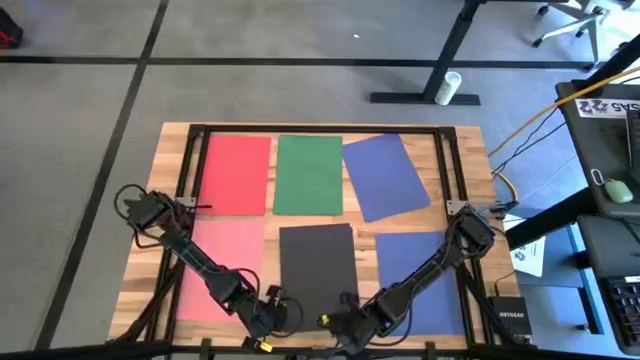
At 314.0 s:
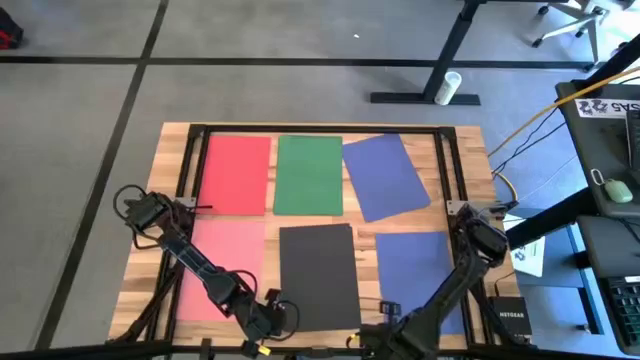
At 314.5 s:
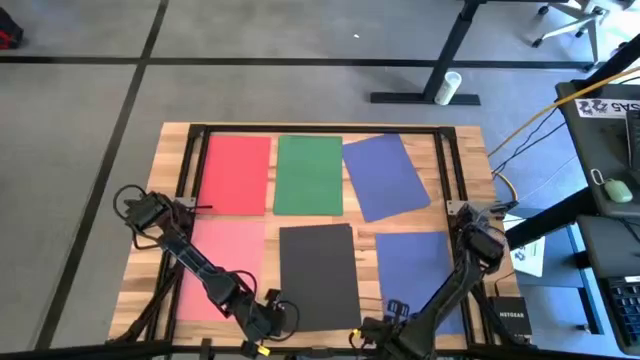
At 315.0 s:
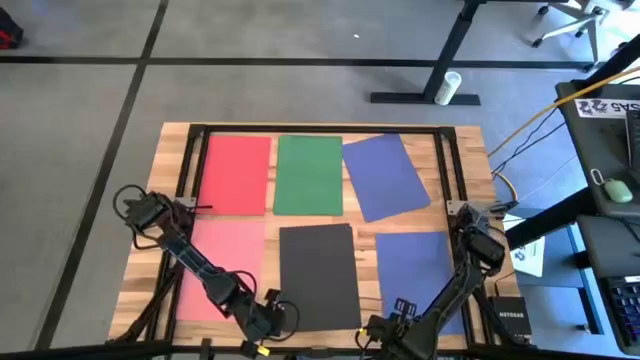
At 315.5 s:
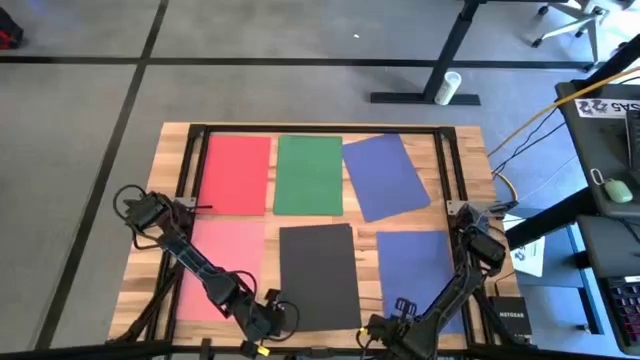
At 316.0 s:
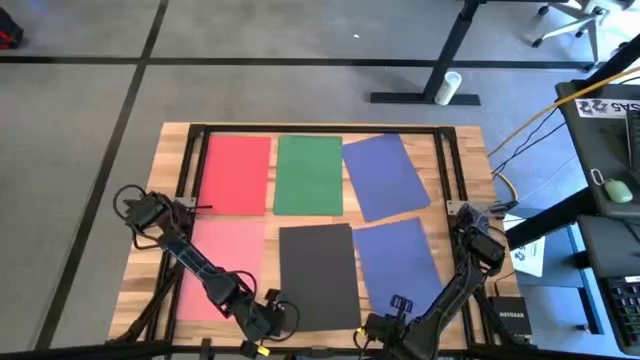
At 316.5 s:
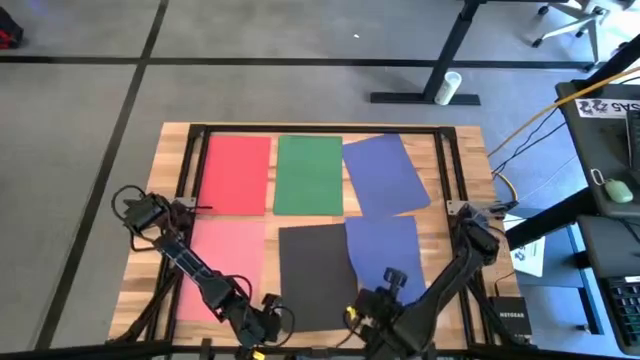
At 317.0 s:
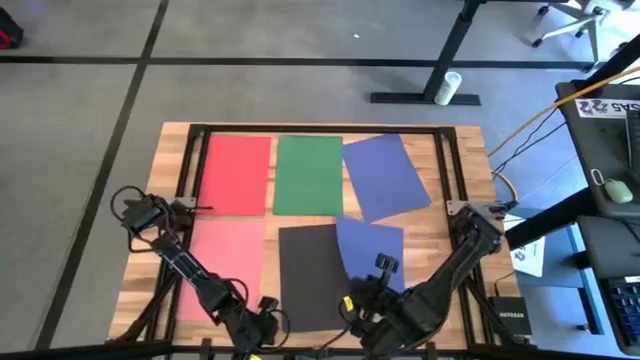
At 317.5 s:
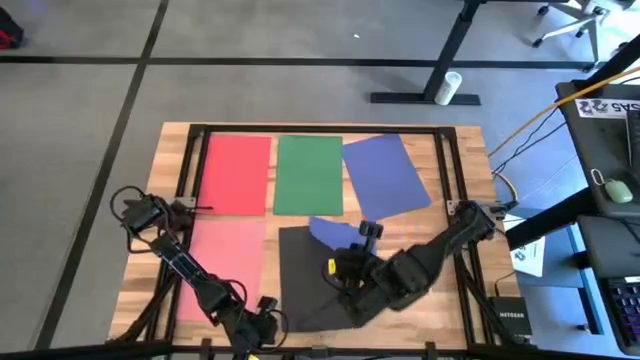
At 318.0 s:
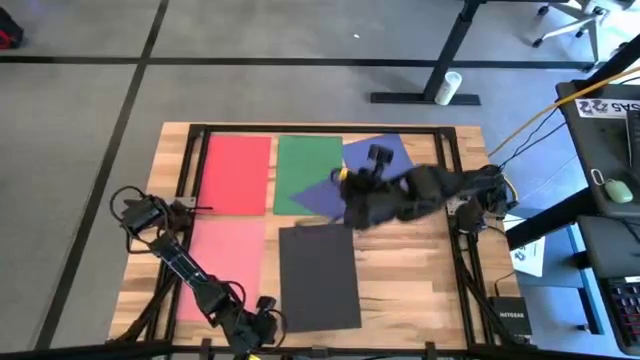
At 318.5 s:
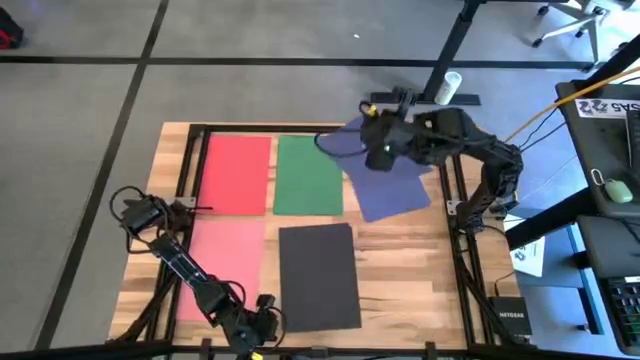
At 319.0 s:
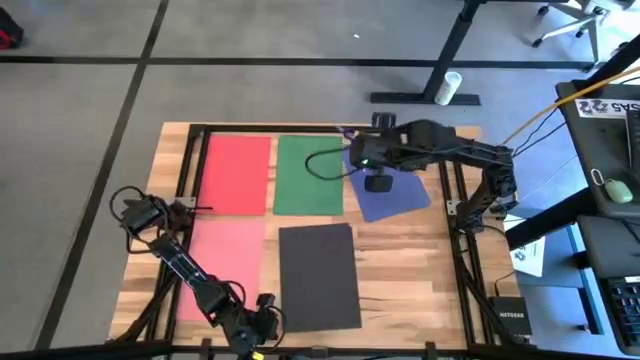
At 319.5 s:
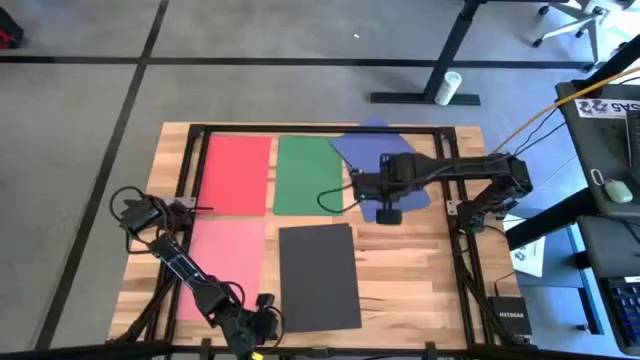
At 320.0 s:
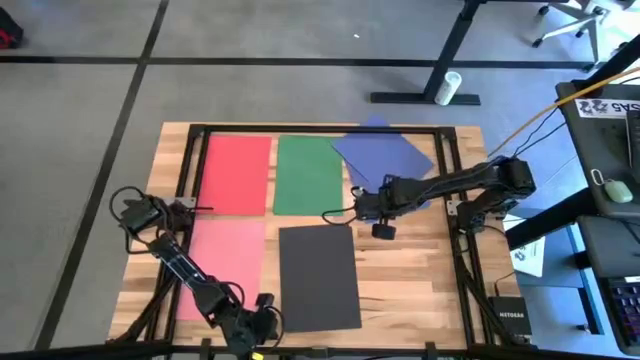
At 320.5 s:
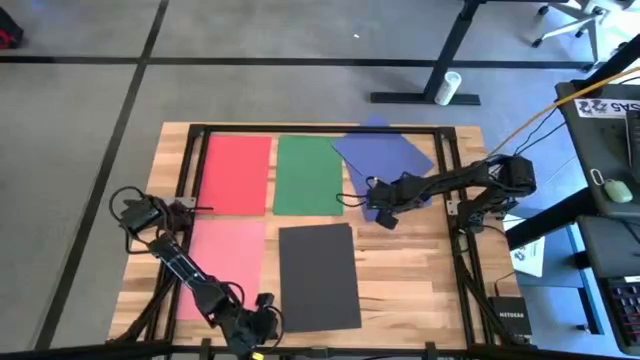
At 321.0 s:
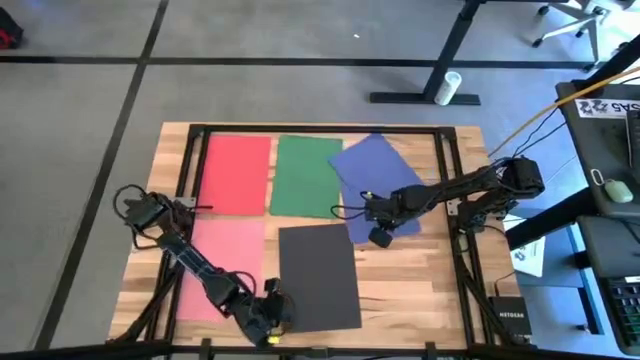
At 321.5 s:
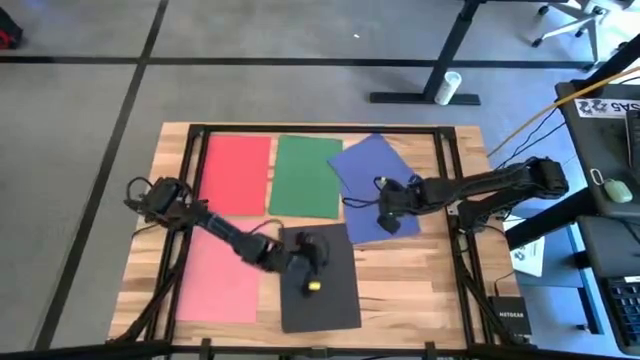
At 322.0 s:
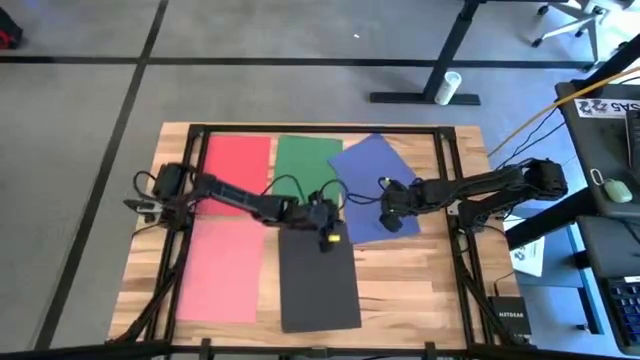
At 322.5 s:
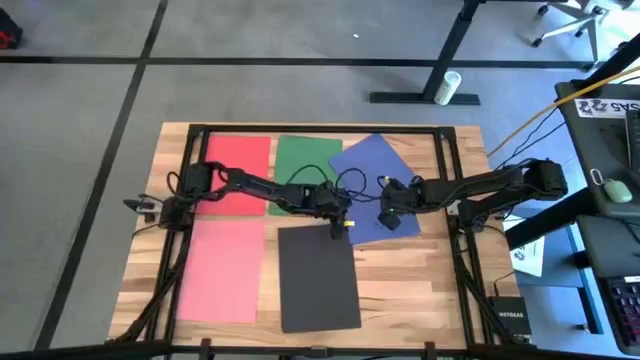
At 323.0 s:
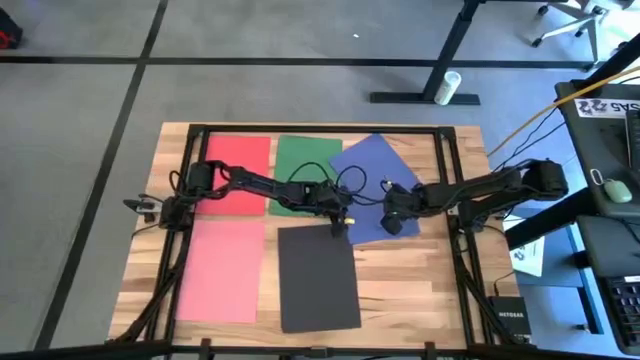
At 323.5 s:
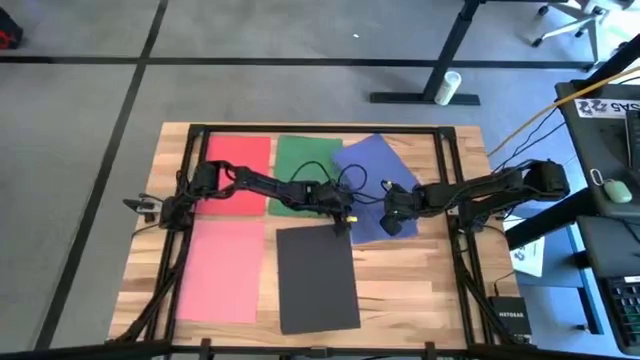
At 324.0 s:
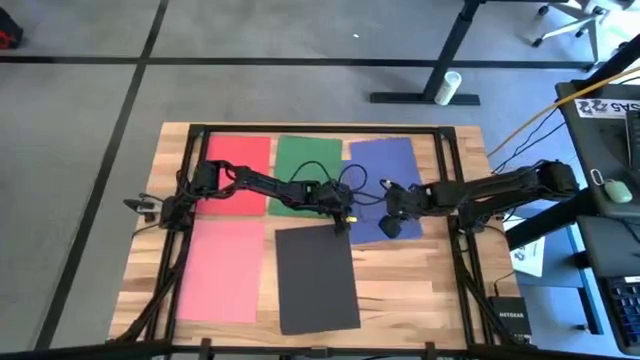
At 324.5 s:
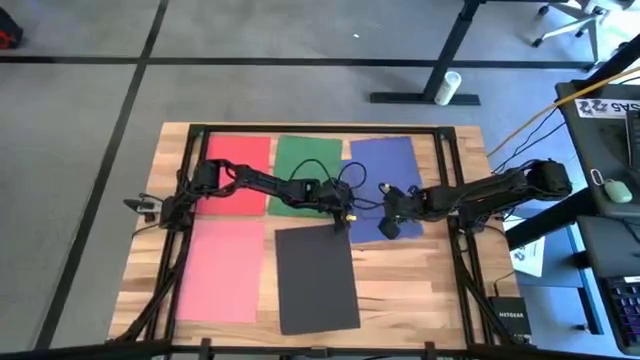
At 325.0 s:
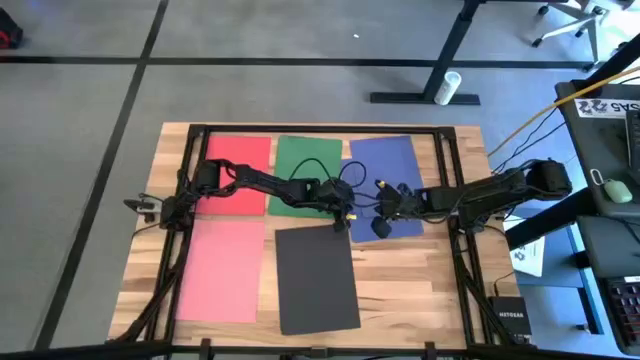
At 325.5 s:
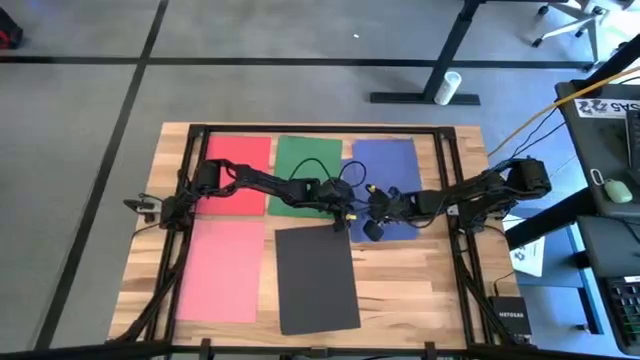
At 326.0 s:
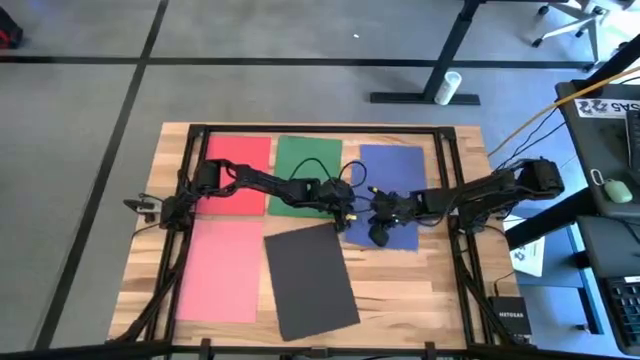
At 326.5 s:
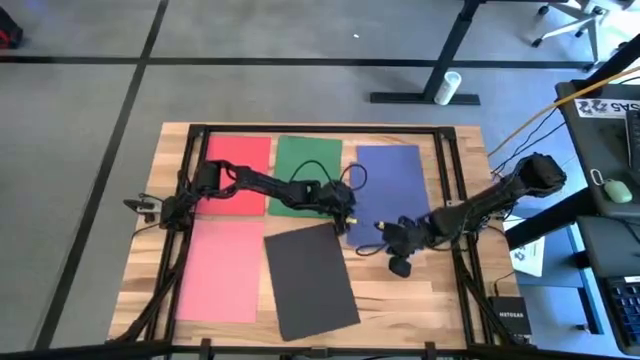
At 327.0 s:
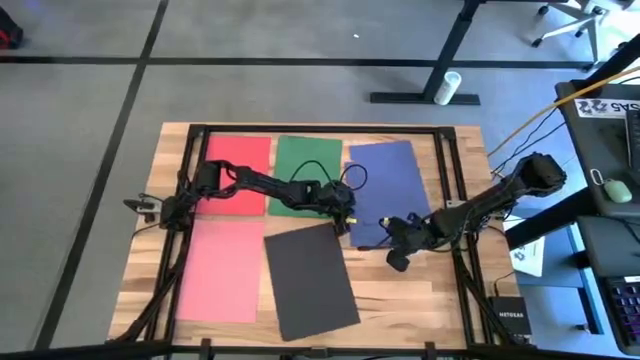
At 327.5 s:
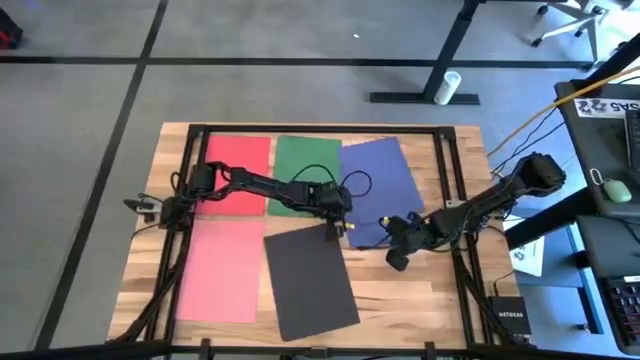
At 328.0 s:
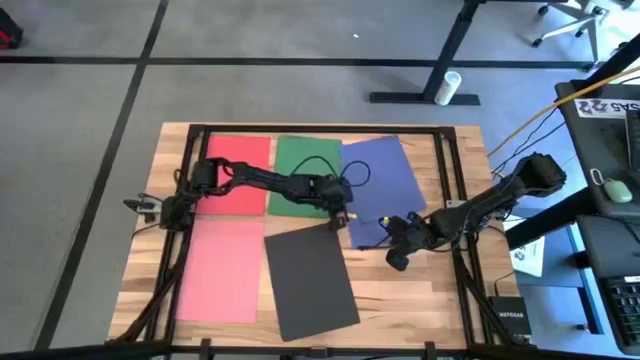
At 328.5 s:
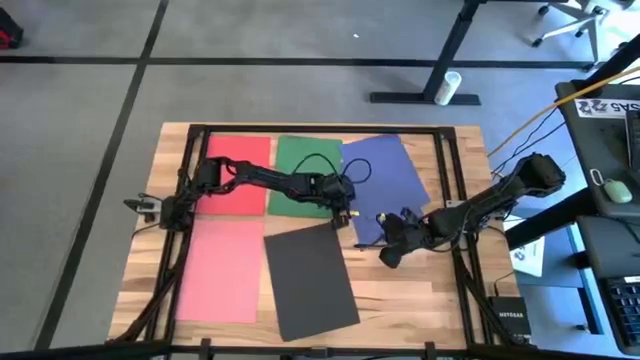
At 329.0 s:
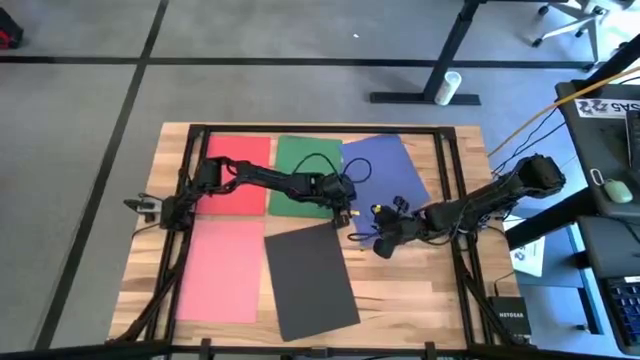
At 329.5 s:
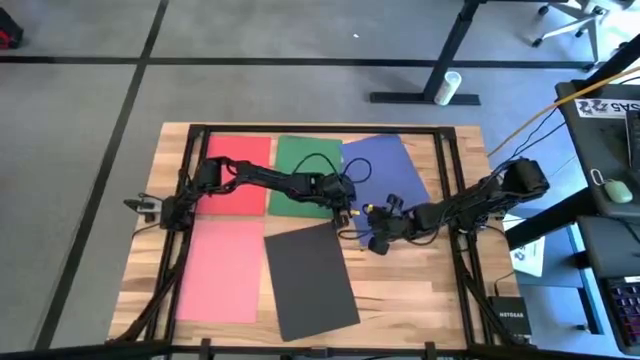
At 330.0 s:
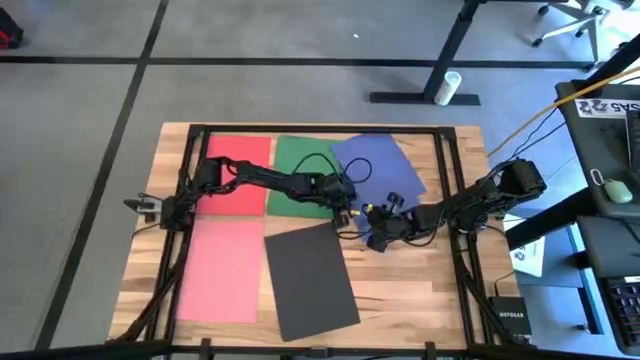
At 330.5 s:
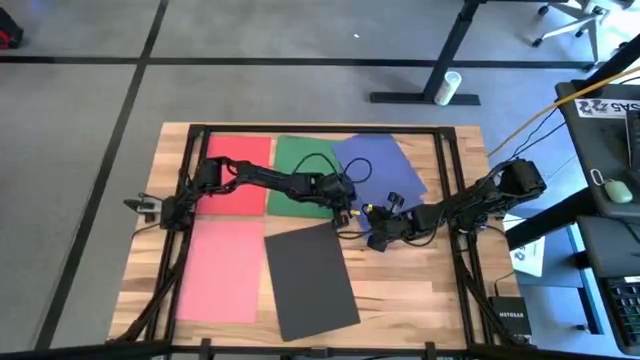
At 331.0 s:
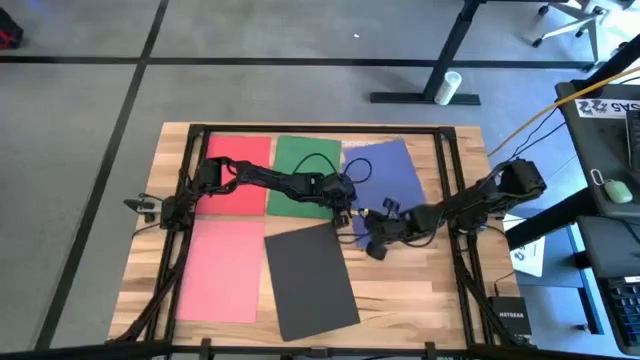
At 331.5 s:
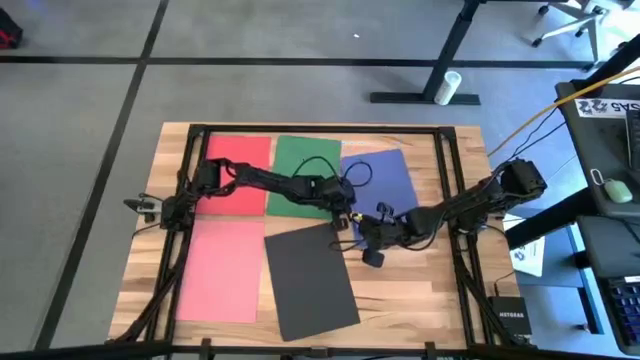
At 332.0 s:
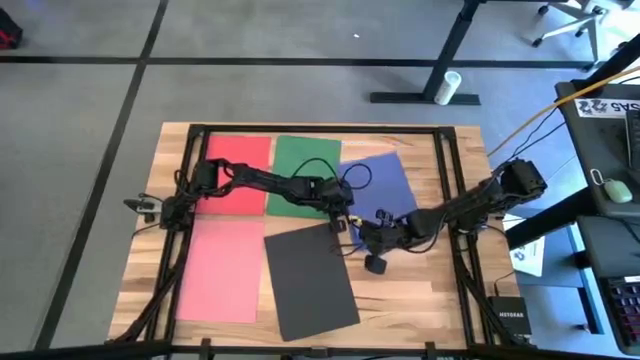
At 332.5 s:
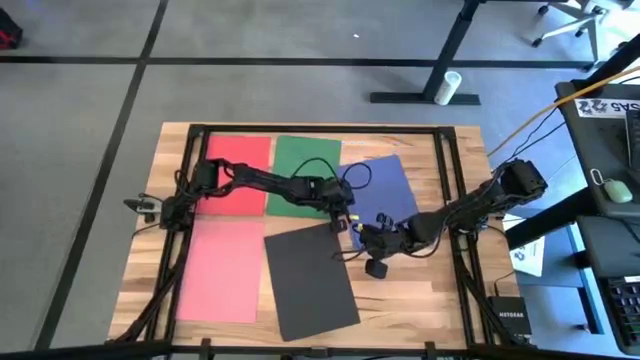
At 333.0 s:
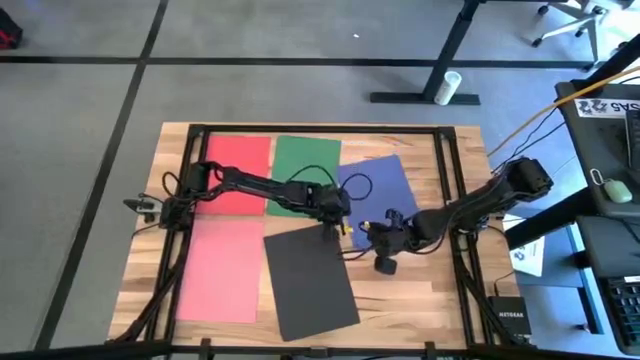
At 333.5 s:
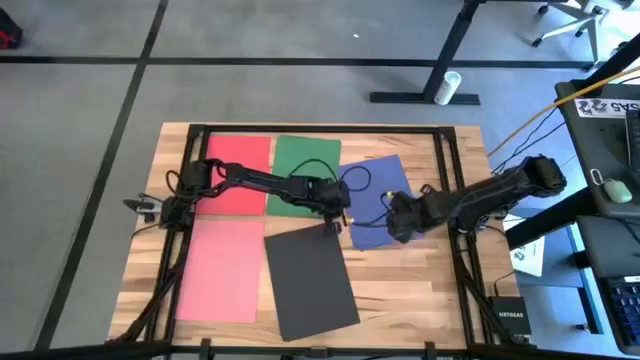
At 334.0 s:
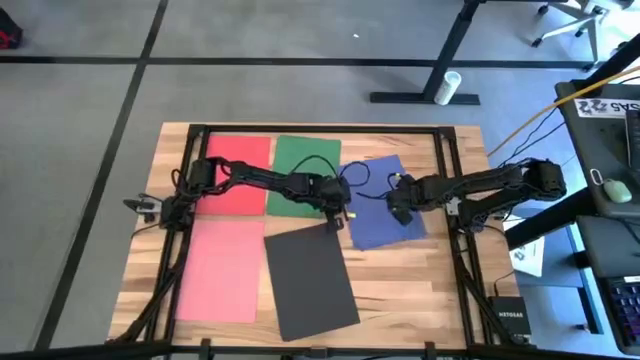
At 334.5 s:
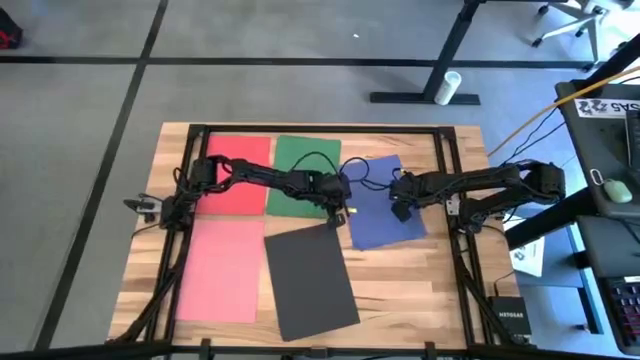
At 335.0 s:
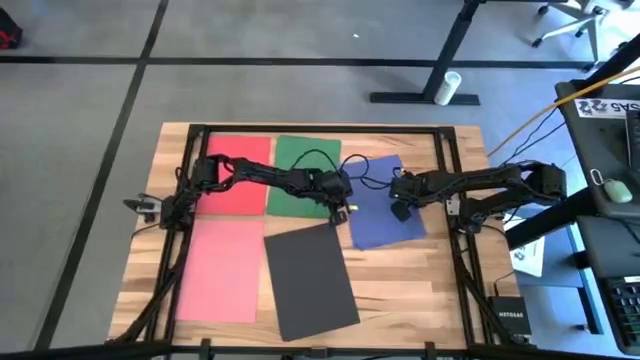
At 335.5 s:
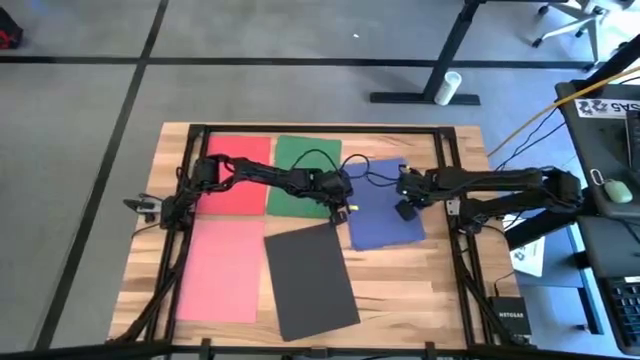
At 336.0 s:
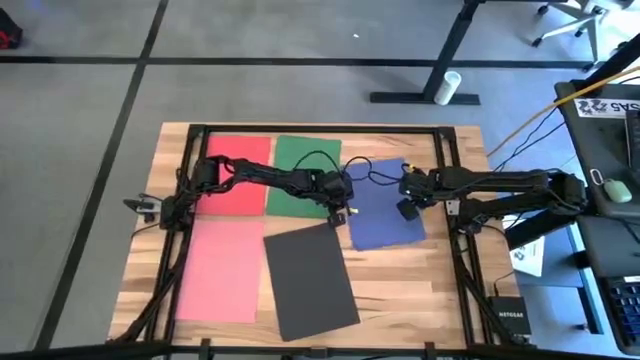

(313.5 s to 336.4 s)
Task: Organize paper
Stack the violet paper on top of the violet papers
